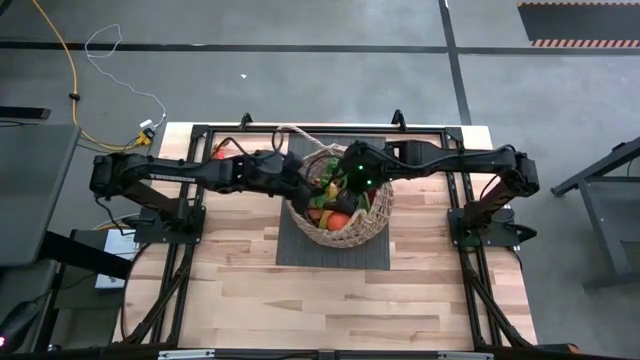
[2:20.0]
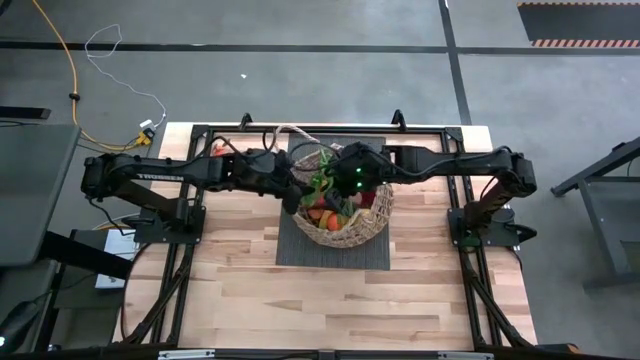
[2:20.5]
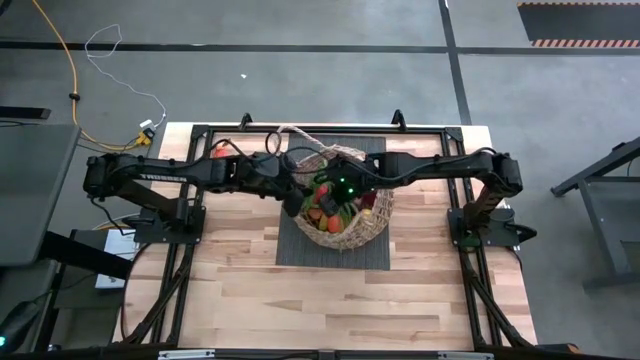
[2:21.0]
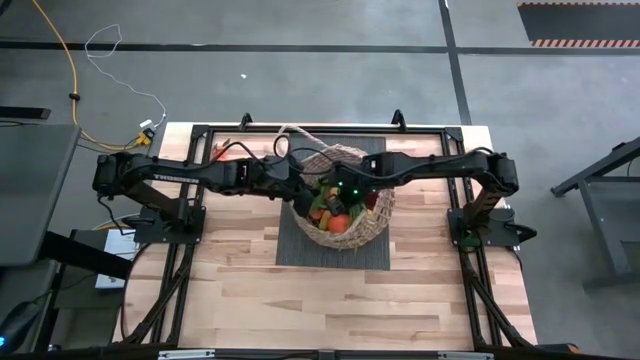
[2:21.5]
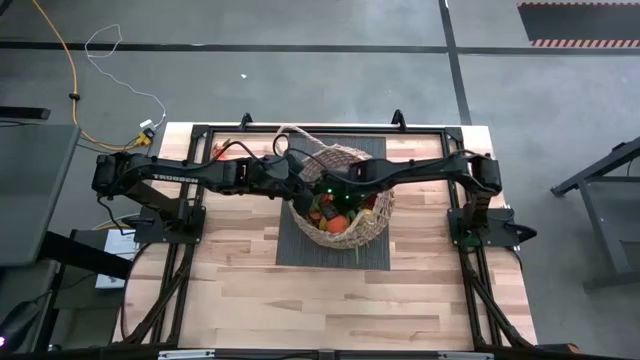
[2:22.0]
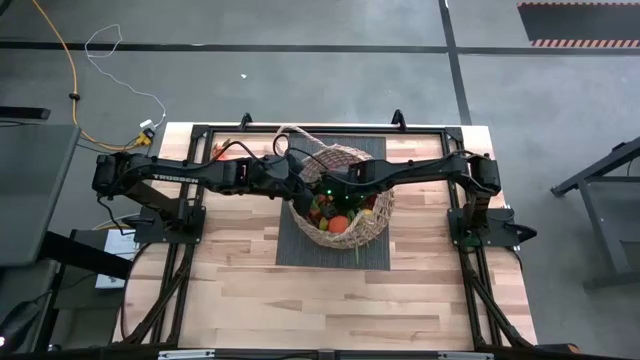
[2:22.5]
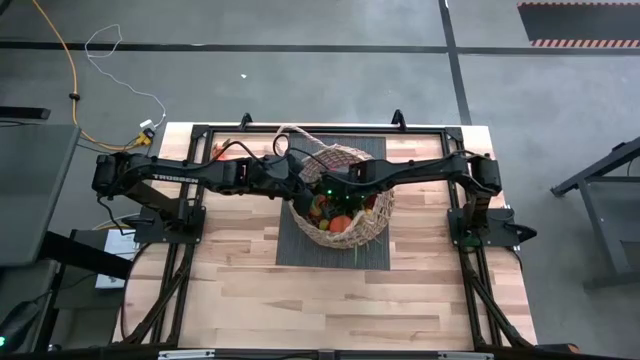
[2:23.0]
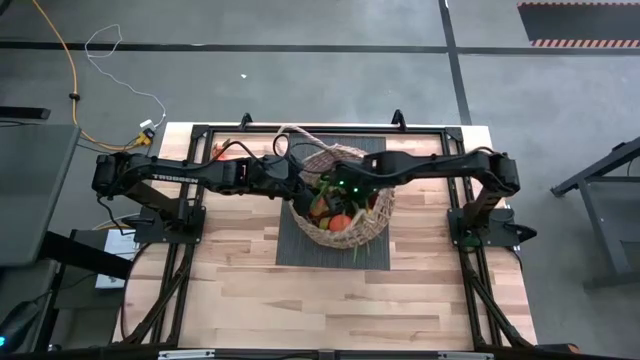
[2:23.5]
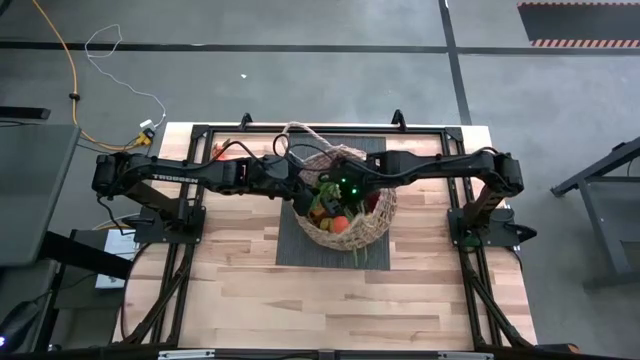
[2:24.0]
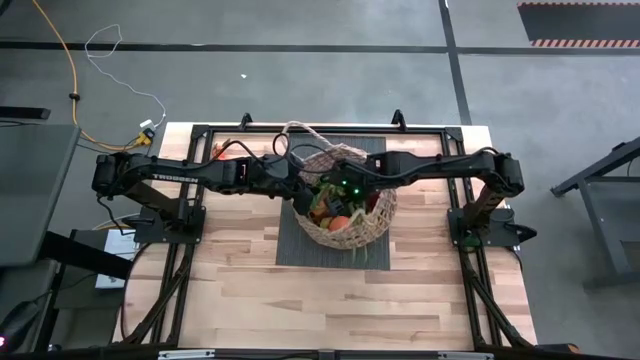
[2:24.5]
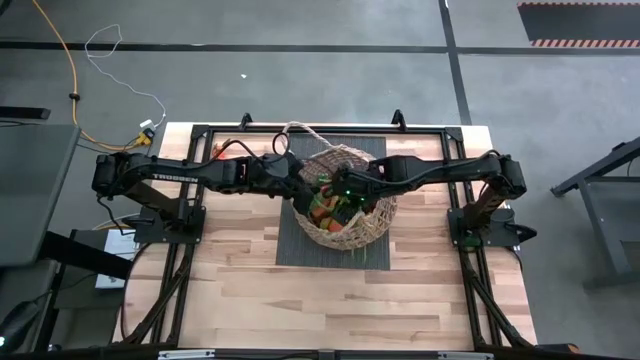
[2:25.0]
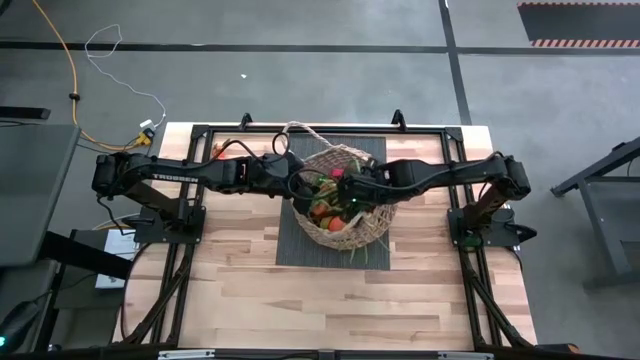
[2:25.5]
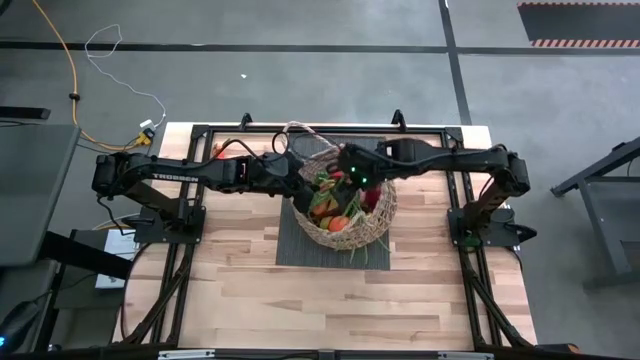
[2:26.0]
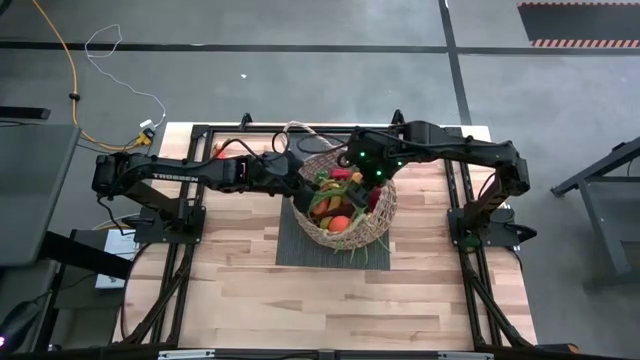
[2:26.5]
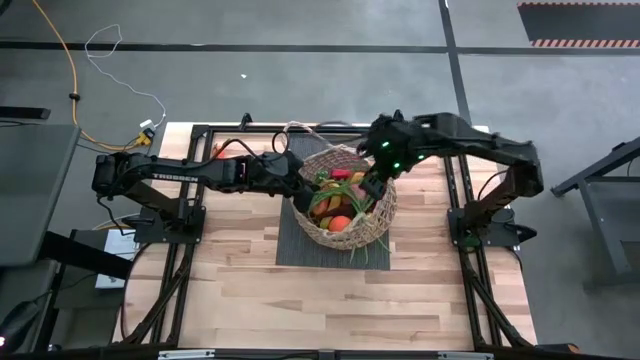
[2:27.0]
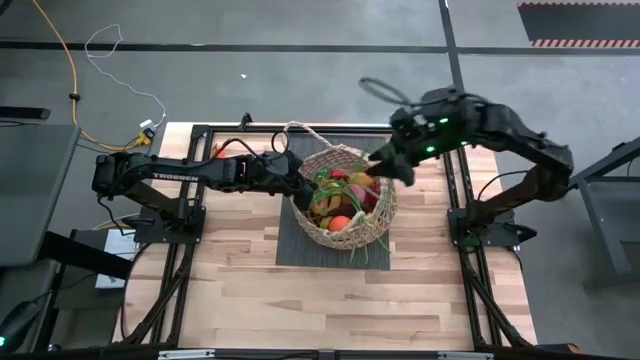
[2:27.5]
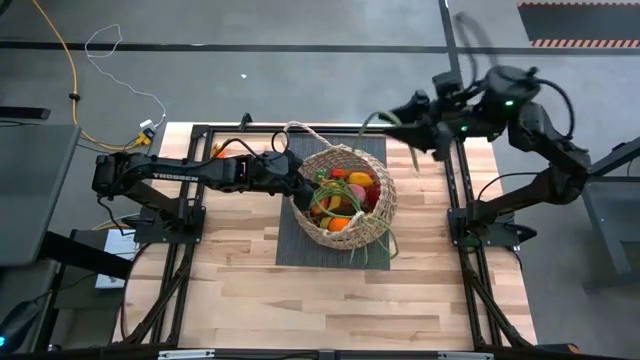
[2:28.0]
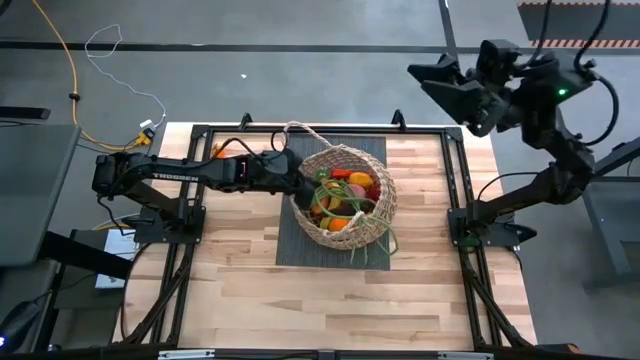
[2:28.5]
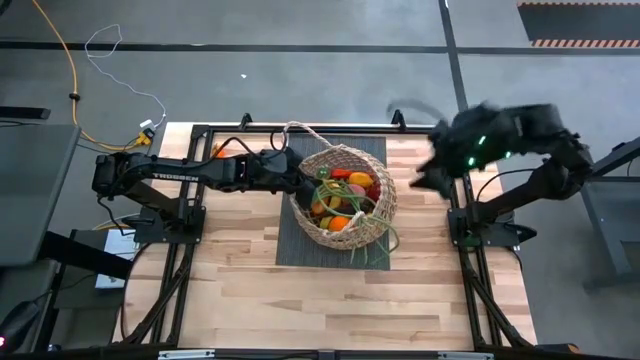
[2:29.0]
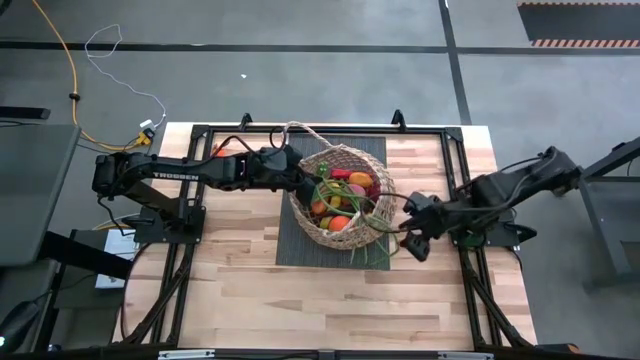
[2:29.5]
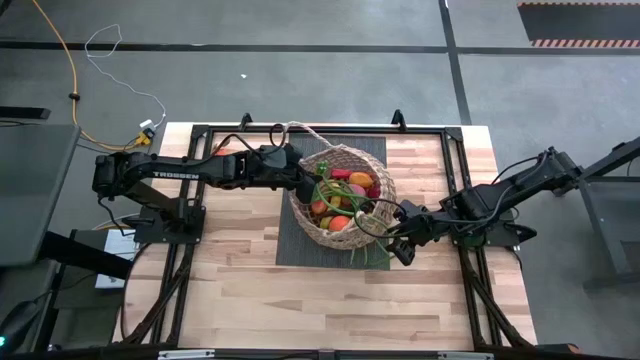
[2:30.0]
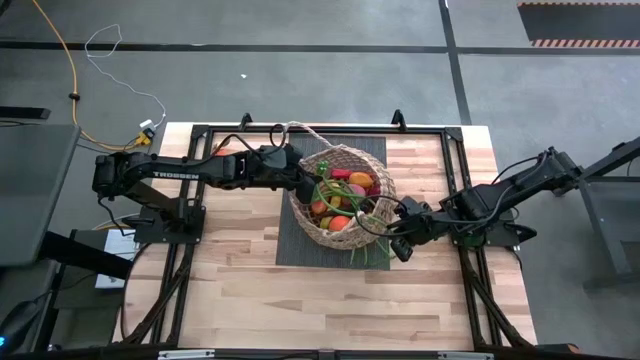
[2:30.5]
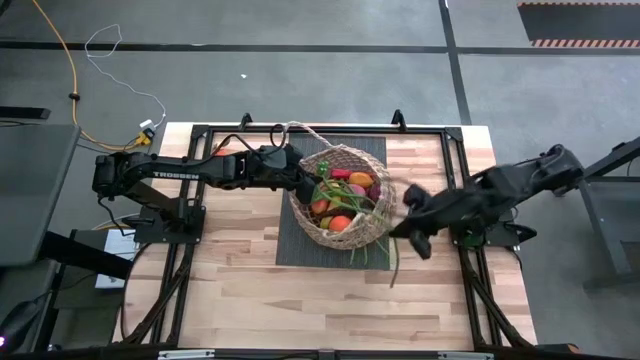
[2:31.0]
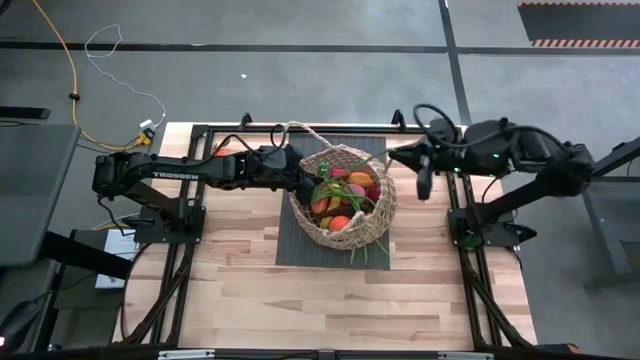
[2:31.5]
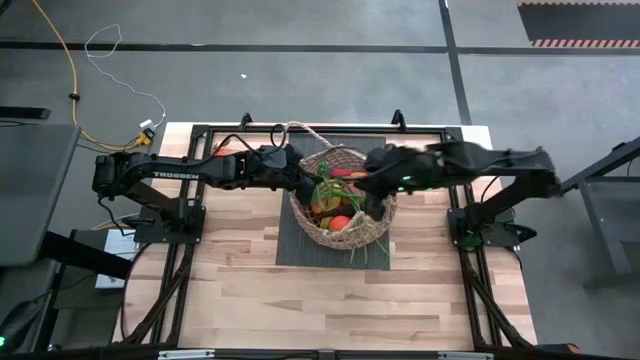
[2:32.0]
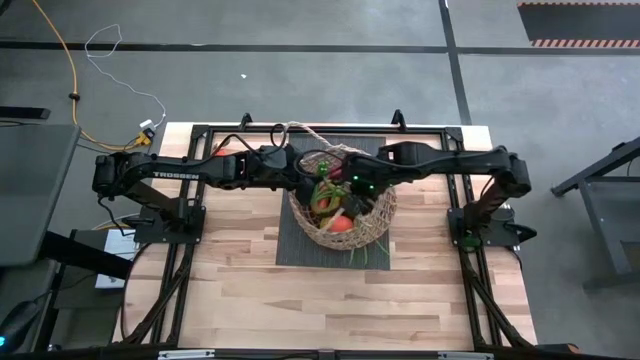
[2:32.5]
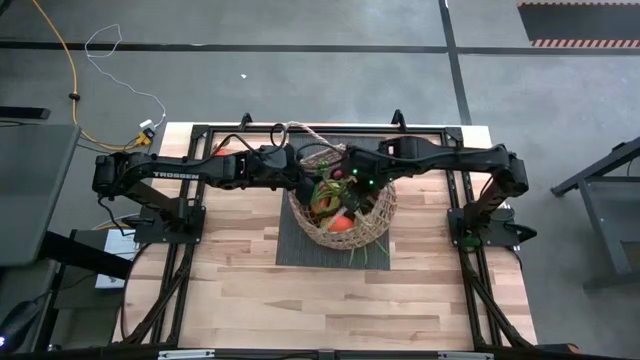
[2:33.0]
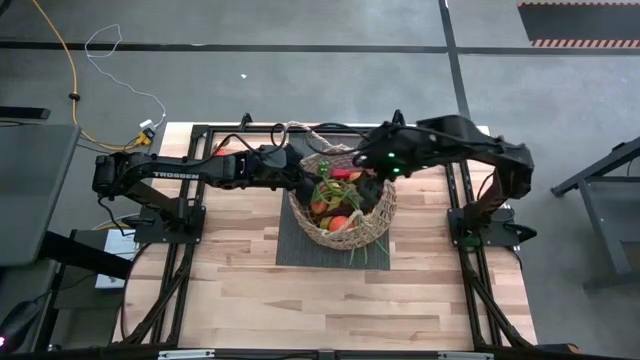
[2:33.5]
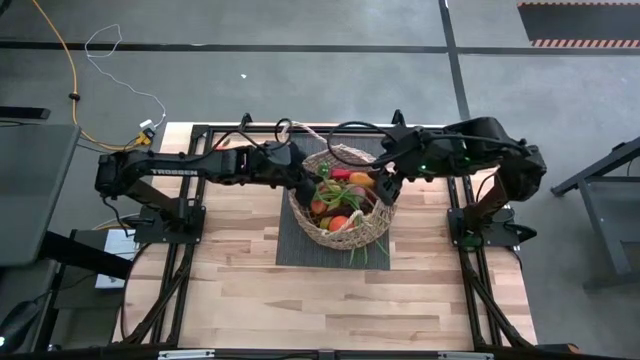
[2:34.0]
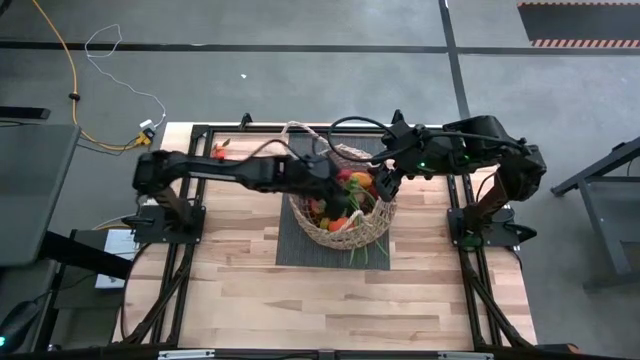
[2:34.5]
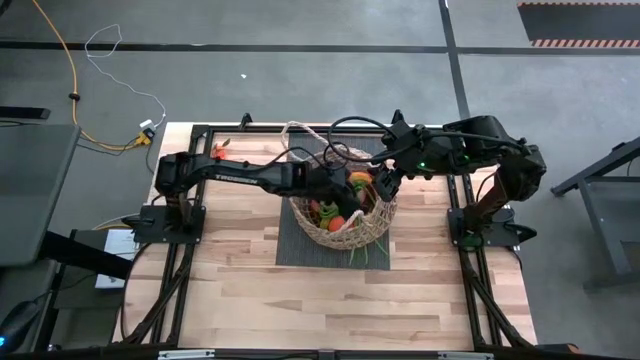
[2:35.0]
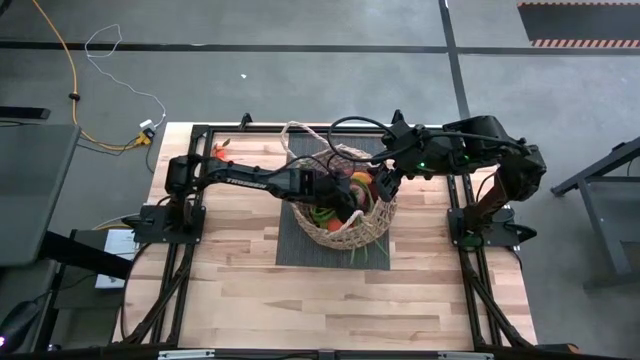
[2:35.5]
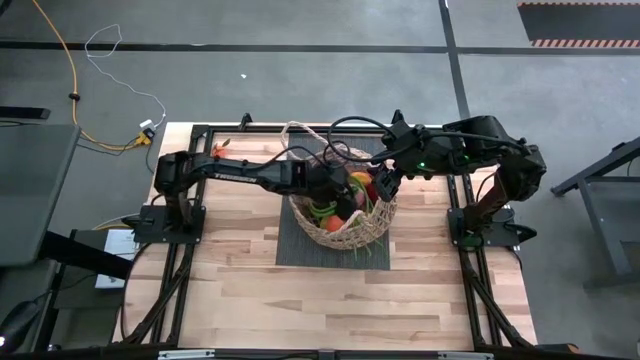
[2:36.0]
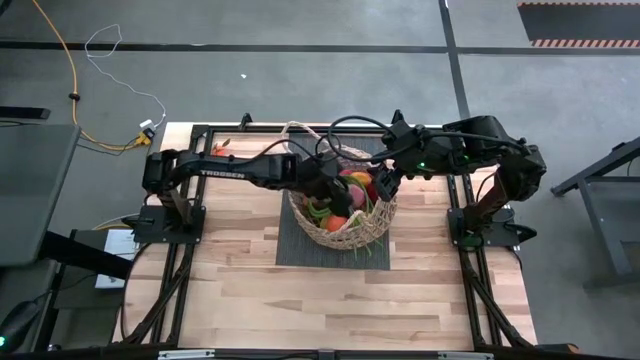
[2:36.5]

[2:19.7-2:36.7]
Task: Build produce basket
Put the string beans into the woven basket

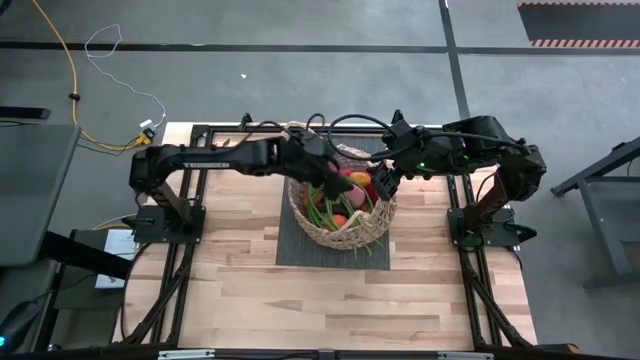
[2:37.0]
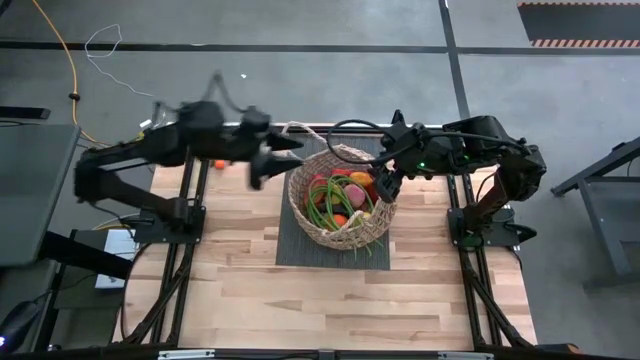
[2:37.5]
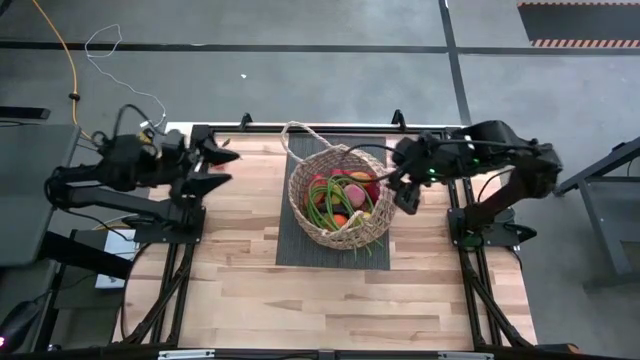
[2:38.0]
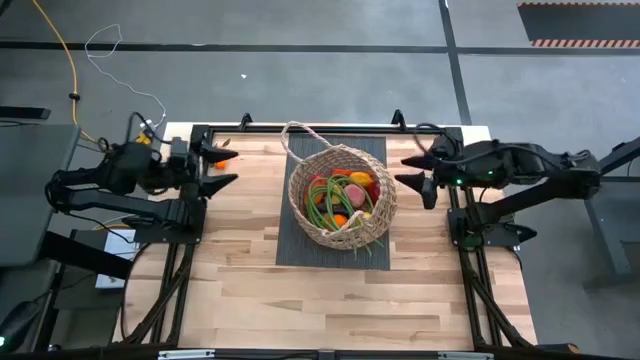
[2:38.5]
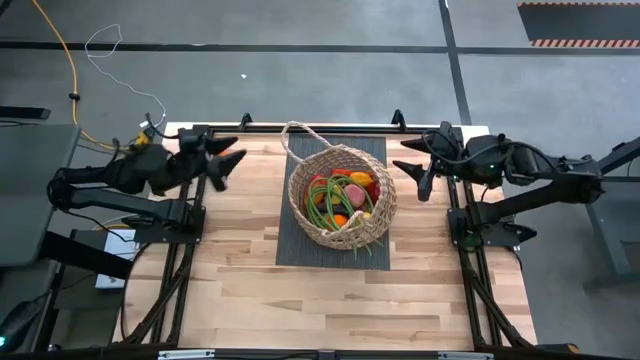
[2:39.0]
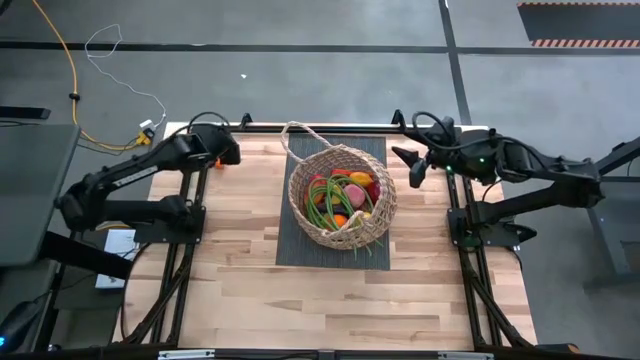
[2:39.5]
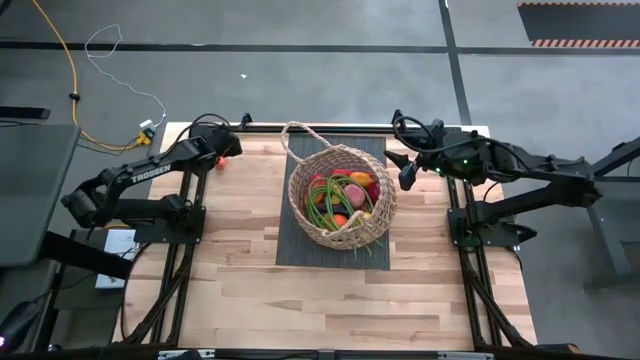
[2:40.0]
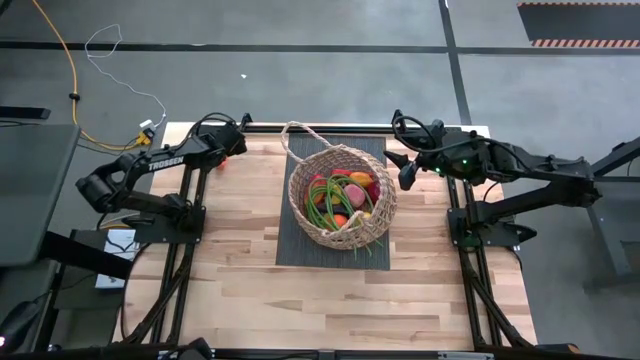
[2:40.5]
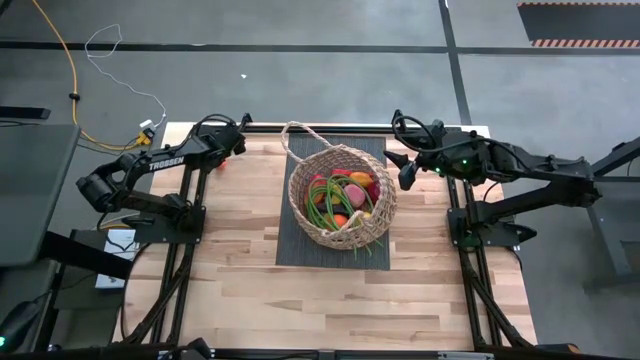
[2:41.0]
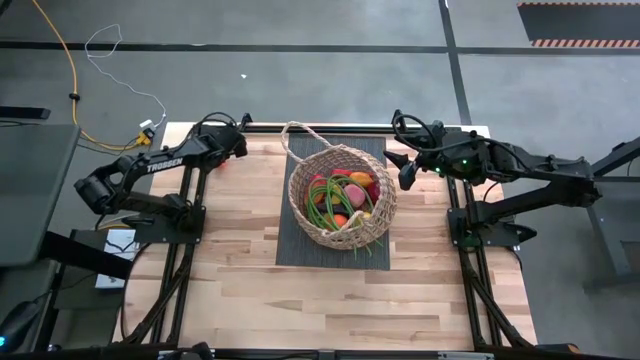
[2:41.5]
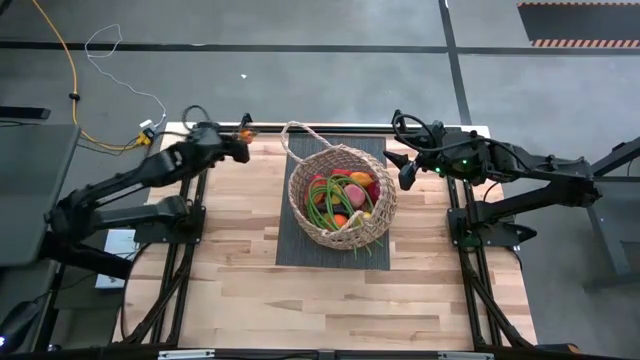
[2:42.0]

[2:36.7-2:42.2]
Put the tangerine into the woven basket
